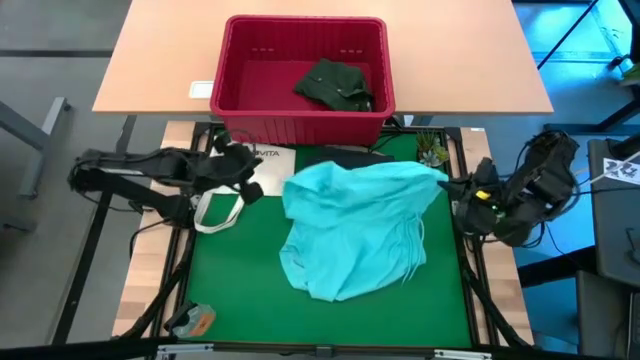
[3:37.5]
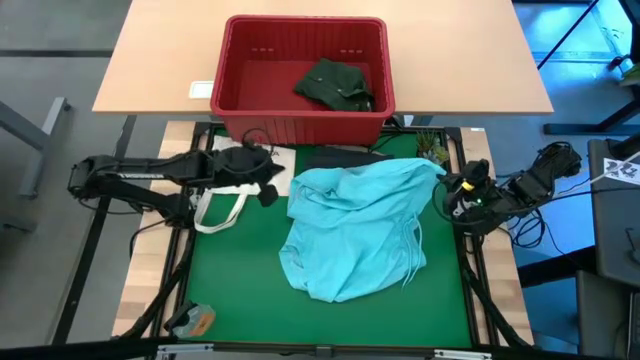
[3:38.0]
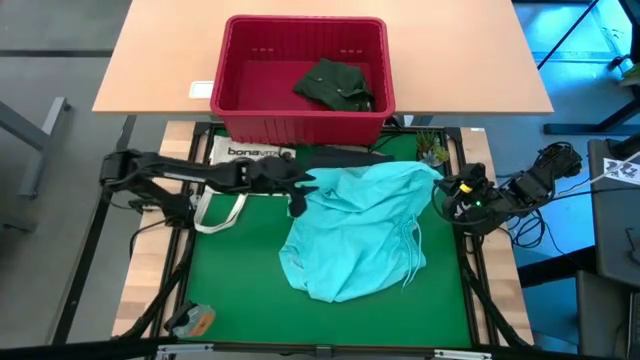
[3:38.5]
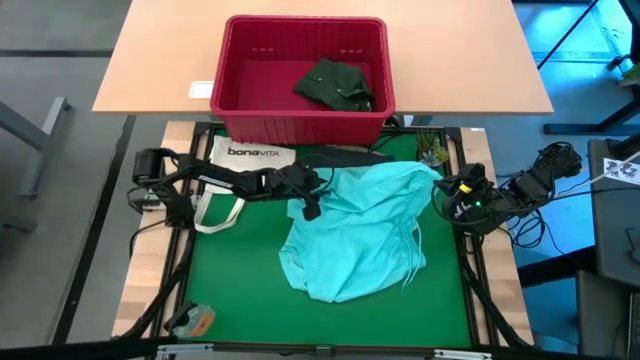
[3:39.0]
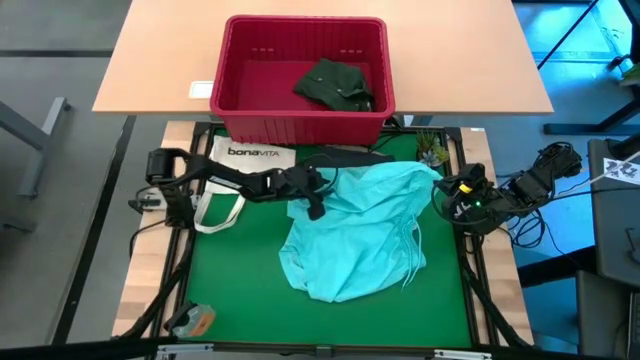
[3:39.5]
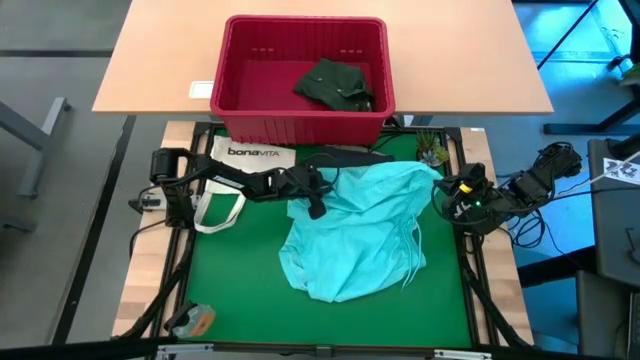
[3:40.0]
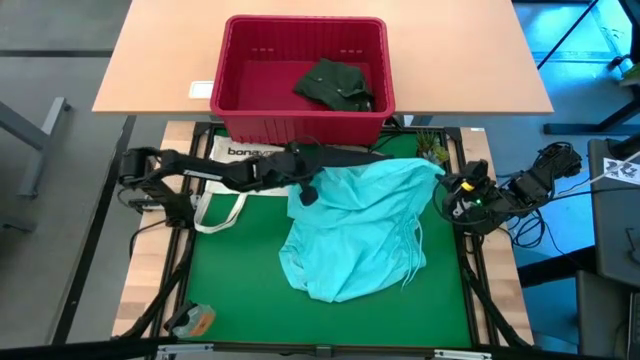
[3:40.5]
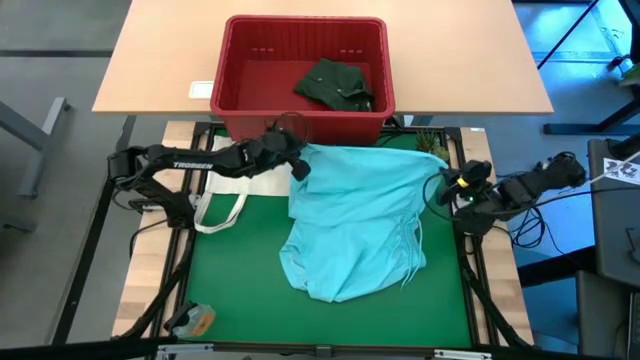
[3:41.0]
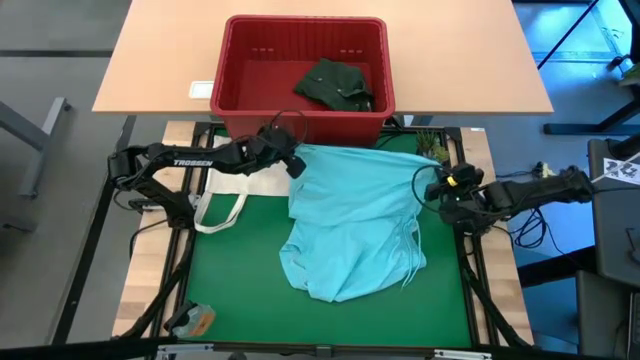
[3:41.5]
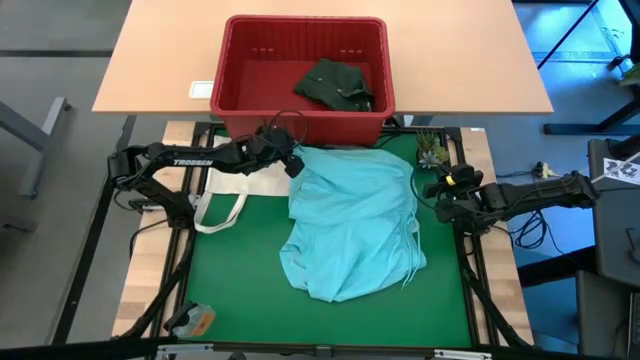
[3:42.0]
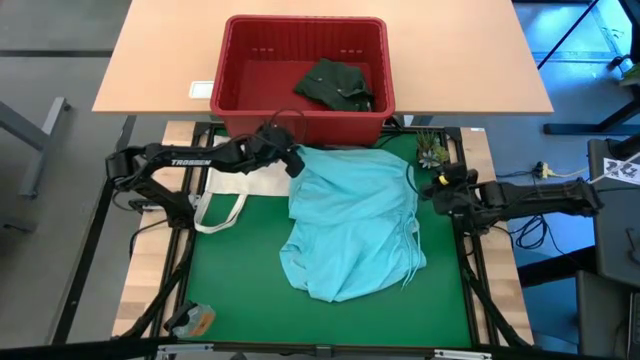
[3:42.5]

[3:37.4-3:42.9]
Task: Fold Laundry from Bin
Remove the light blue shorts from the red laundry bin

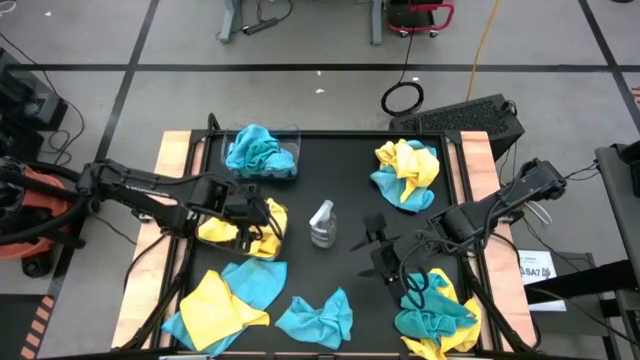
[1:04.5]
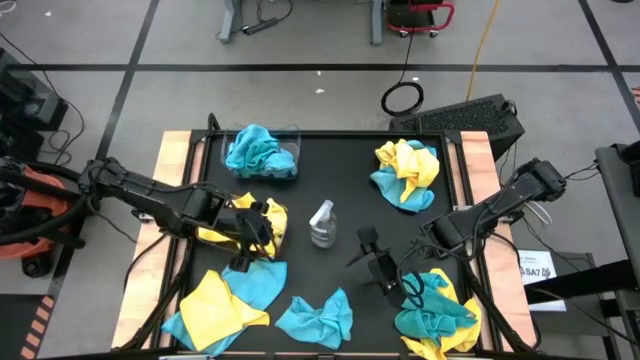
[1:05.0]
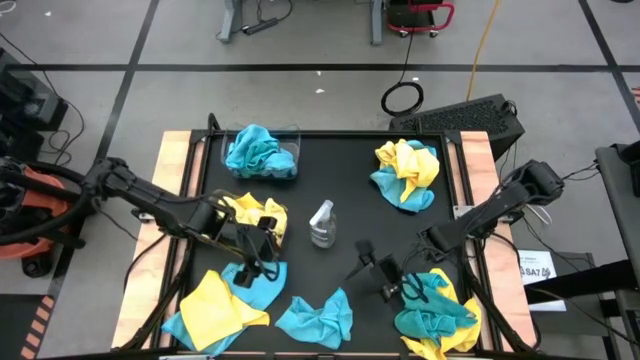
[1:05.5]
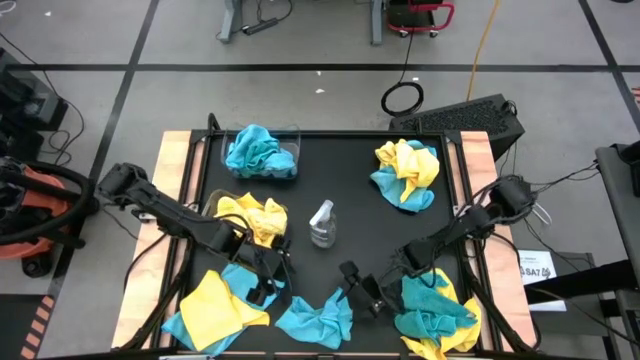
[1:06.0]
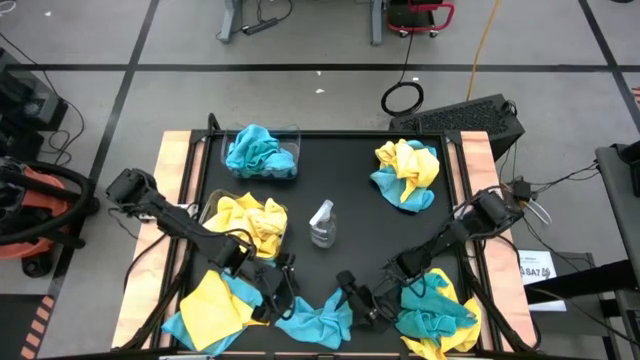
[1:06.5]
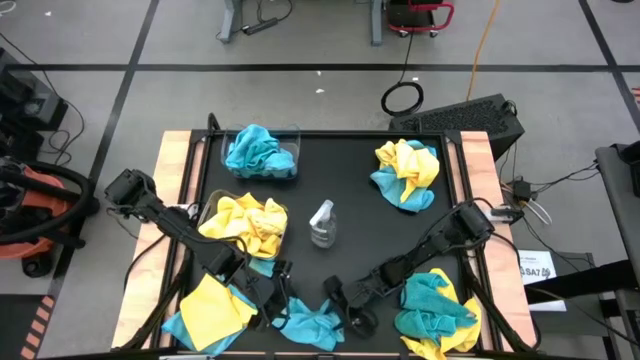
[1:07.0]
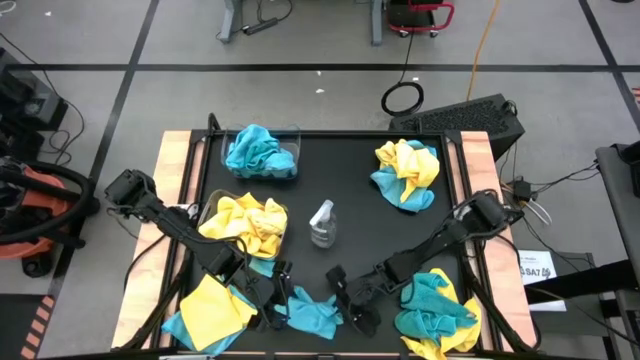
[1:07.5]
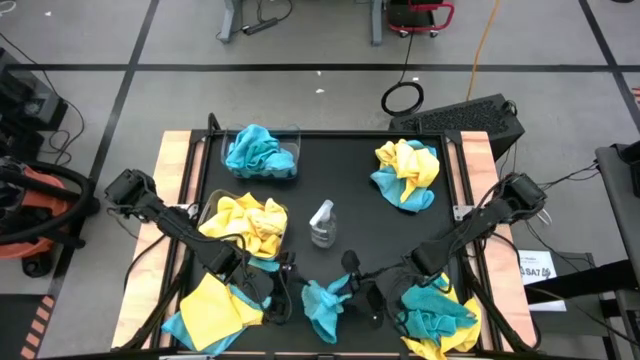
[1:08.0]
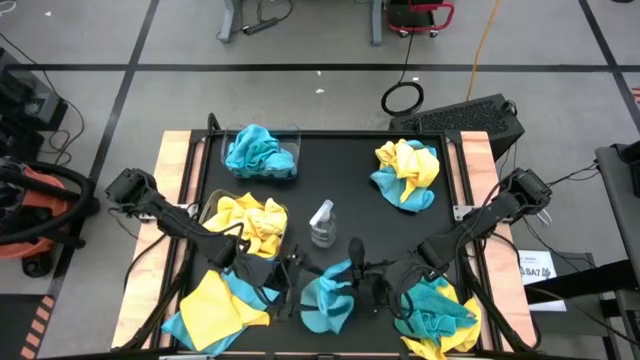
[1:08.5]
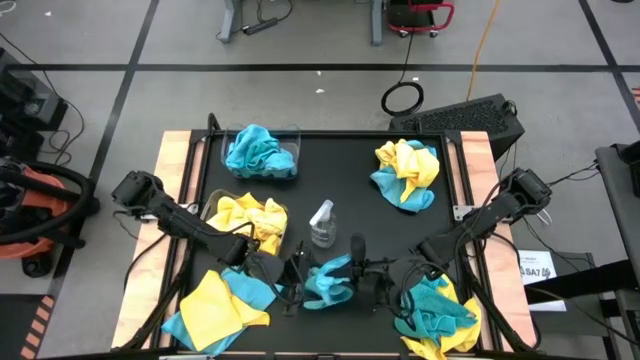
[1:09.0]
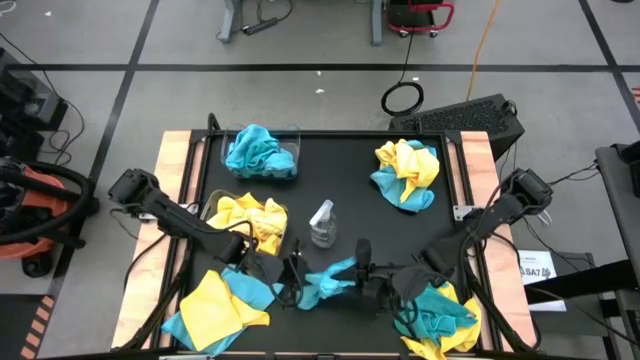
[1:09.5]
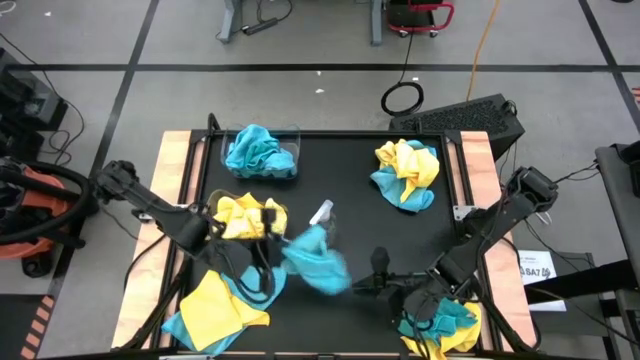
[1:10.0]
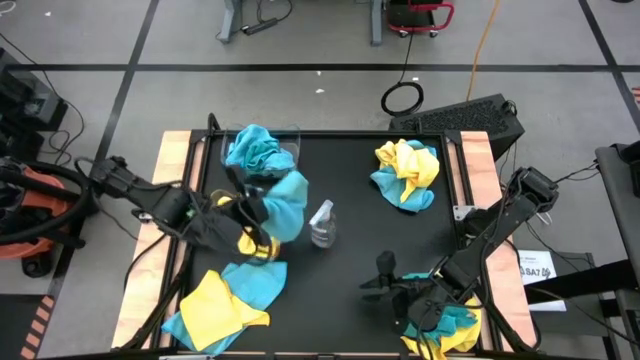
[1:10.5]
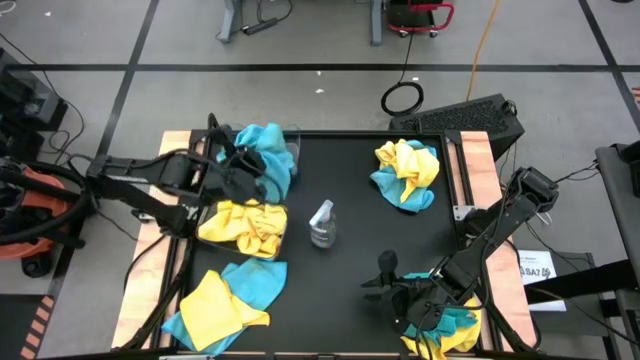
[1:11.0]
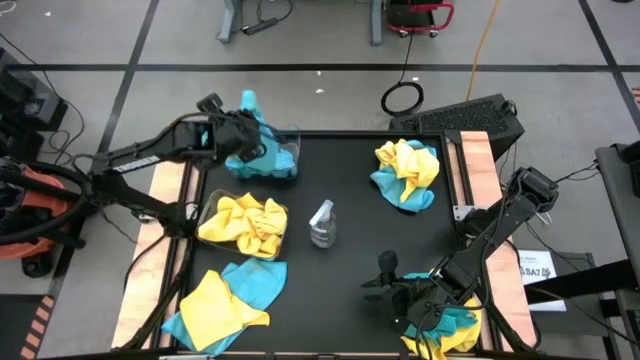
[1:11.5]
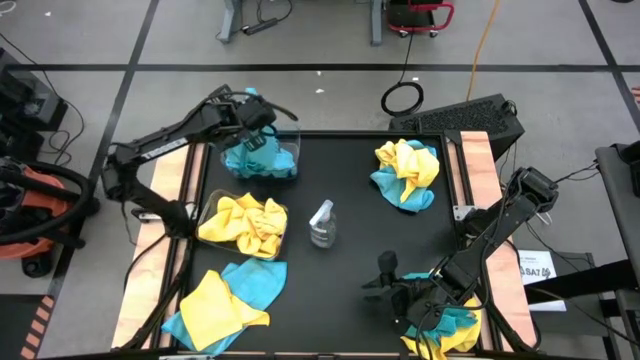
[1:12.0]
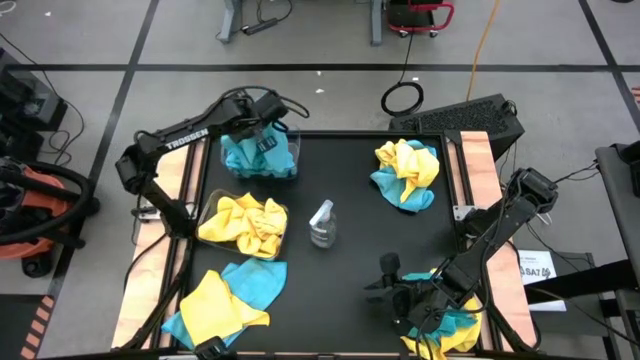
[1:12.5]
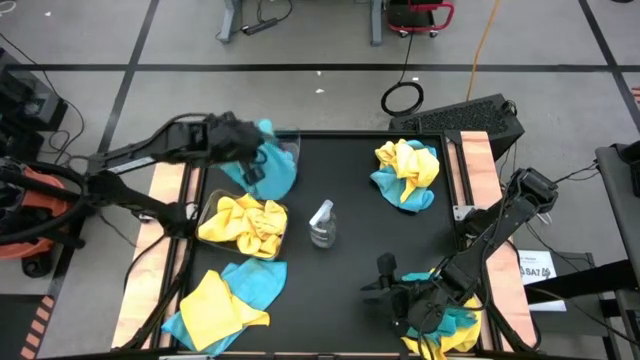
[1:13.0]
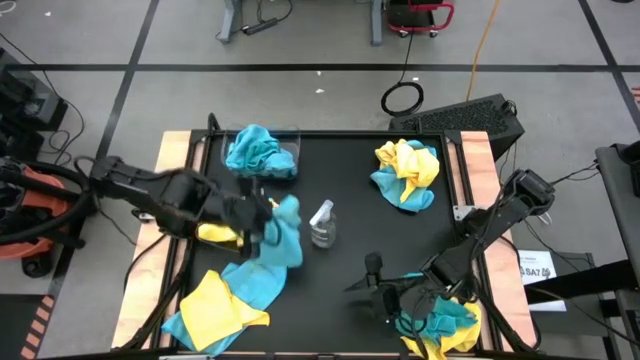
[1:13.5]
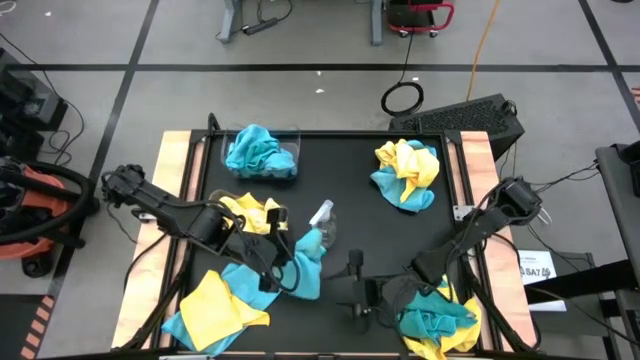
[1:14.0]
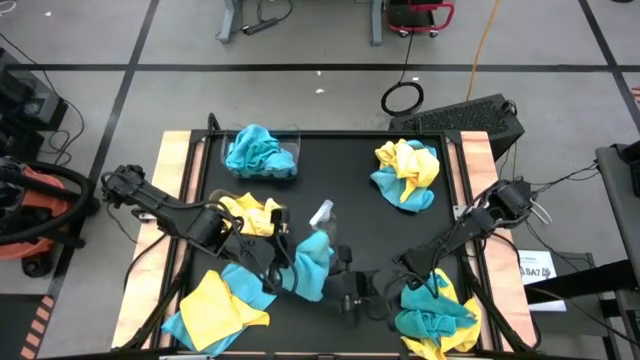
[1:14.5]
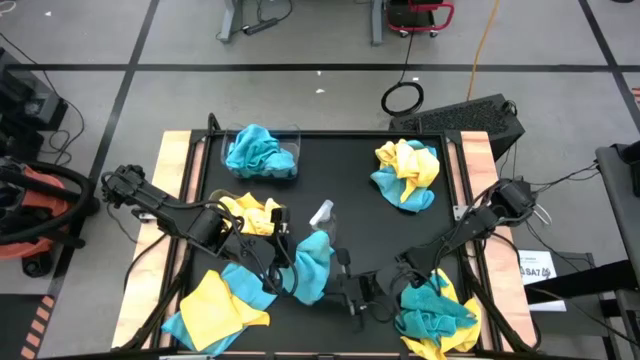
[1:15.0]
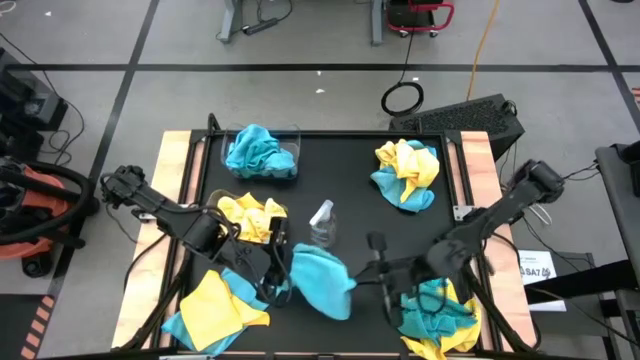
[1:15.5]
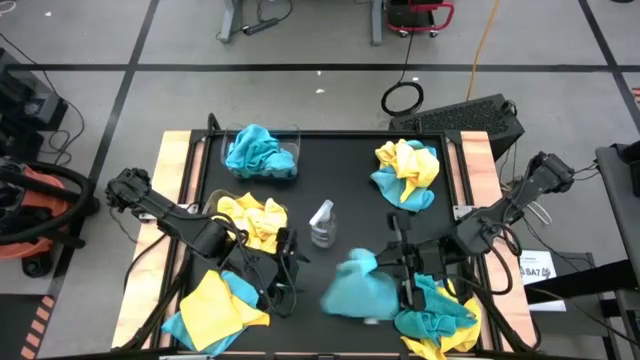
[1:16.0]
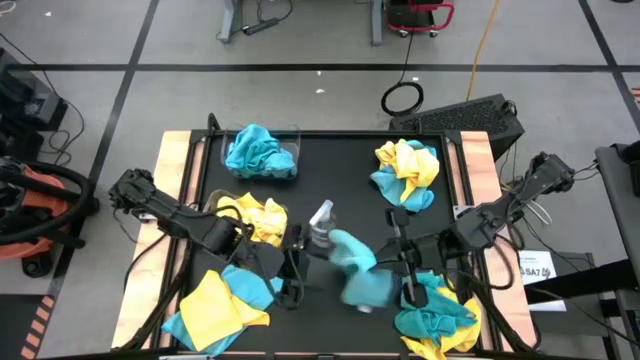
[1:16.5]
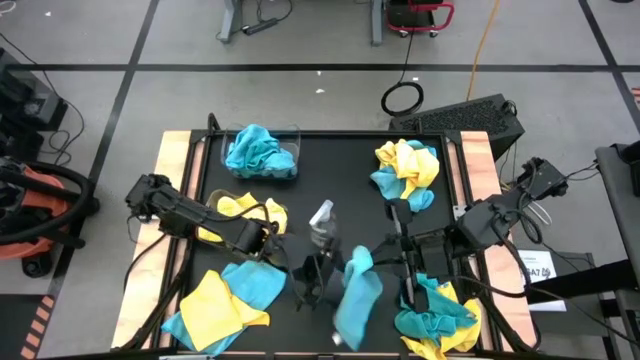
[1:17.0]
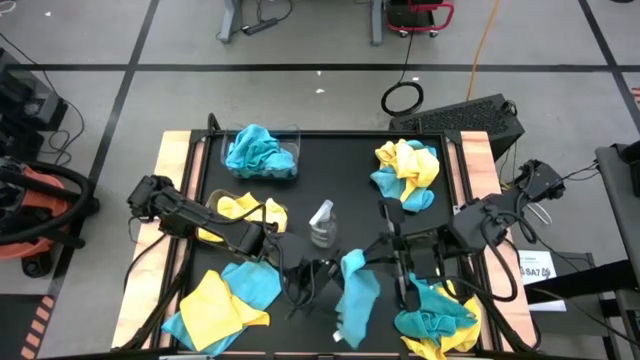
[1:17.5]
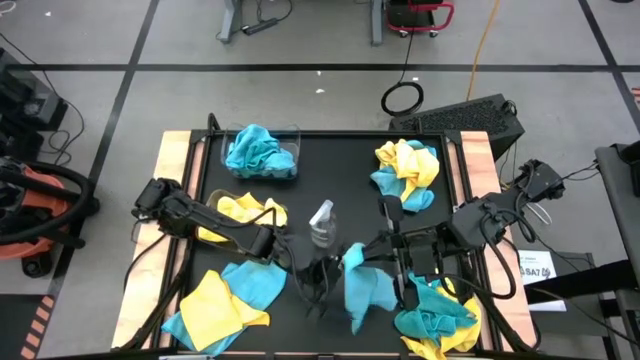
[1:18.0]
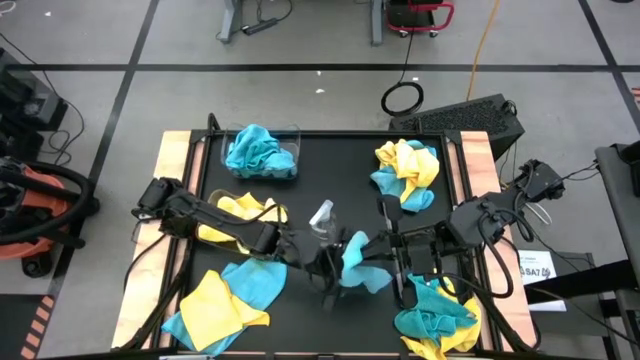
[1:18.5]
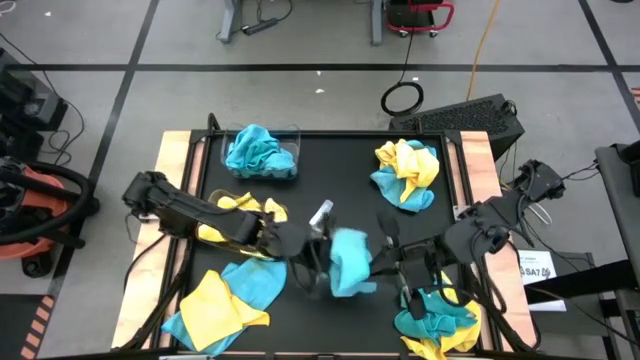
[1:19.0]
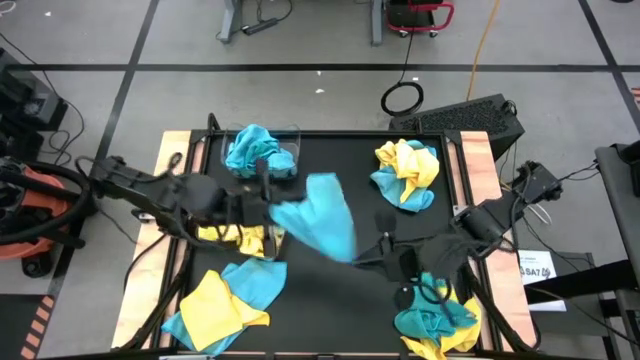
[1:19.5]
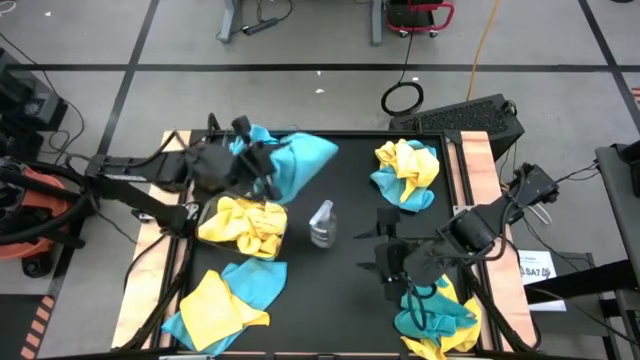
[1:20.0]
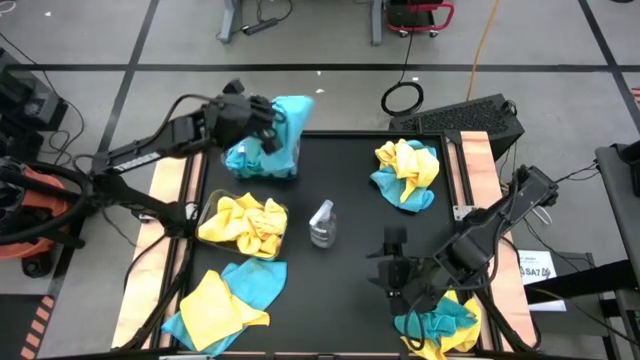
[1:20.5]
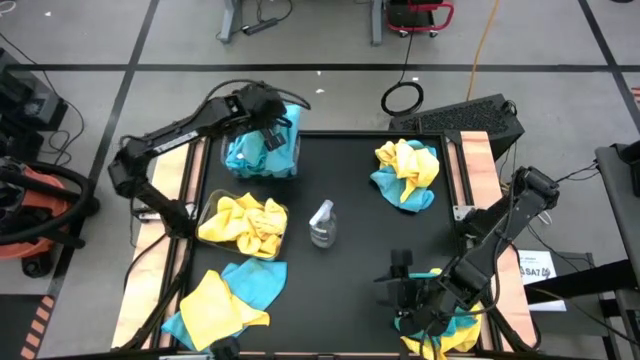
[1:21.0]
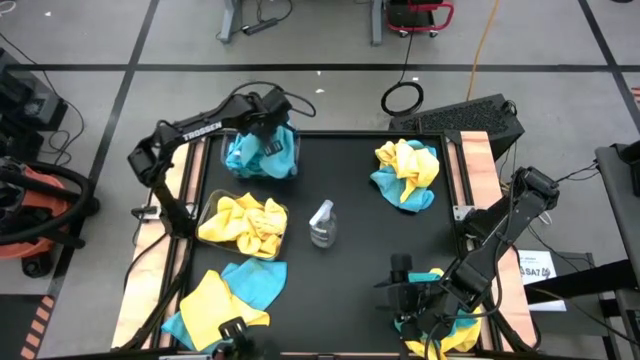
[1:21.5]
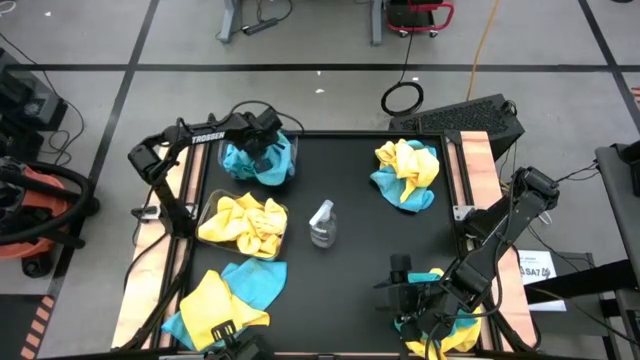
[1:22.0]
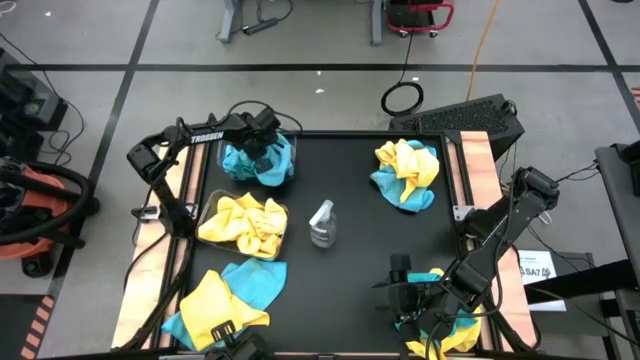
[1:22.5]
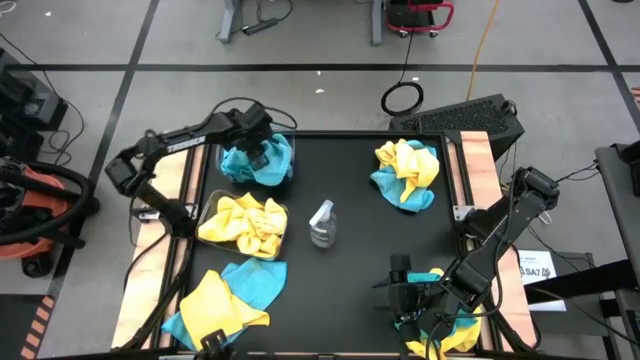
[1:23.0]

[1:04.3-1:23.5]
Task: Sort microfiber towel by color & place in baskets
Put the blue microfiber cloth into the top transparent bin
